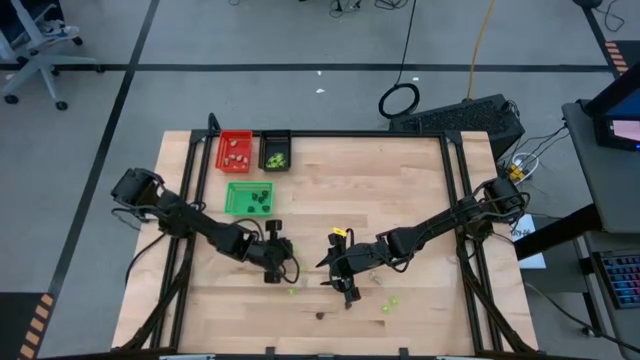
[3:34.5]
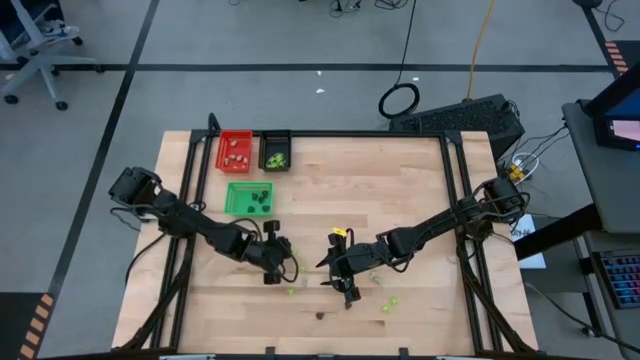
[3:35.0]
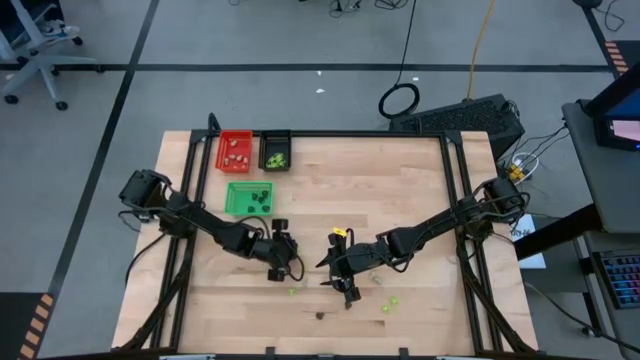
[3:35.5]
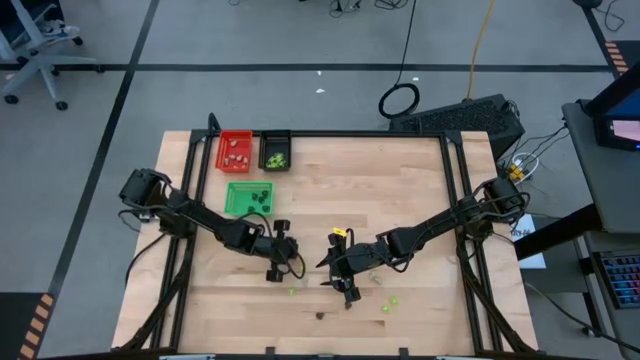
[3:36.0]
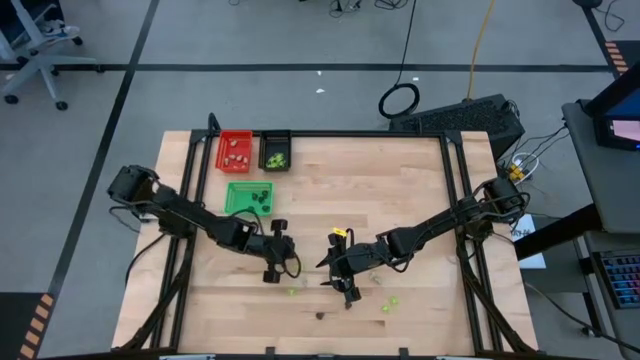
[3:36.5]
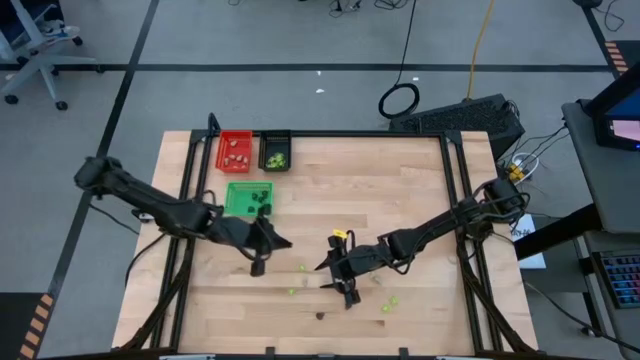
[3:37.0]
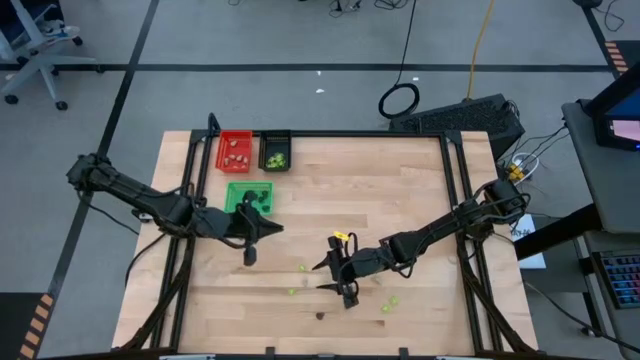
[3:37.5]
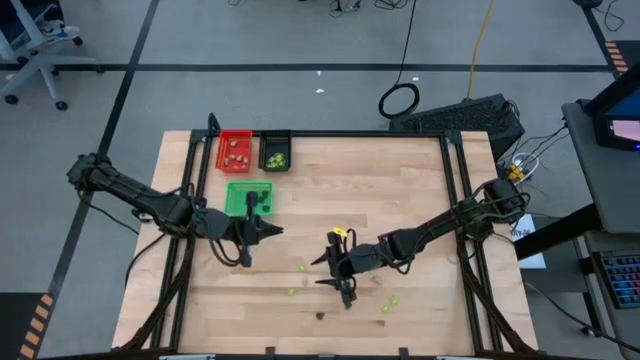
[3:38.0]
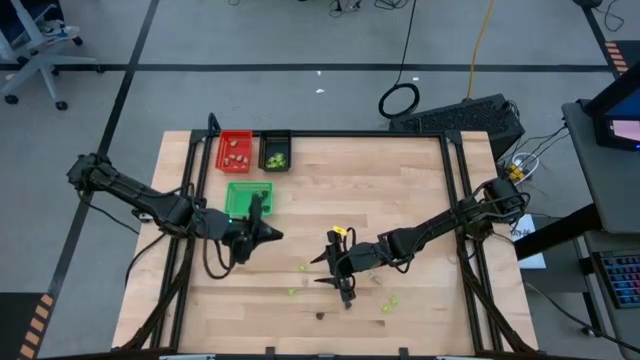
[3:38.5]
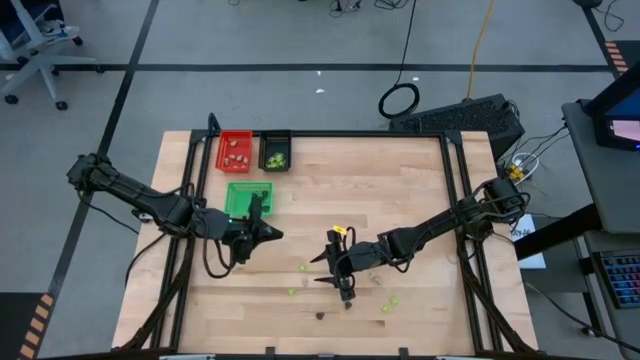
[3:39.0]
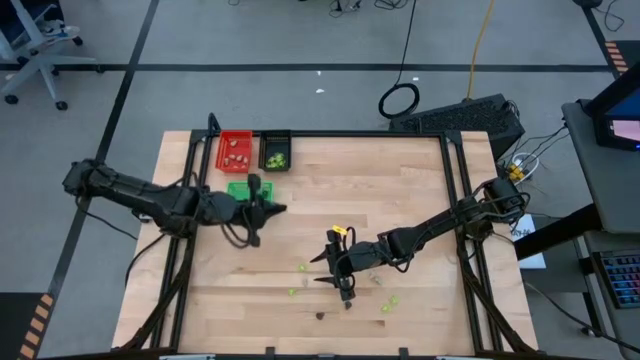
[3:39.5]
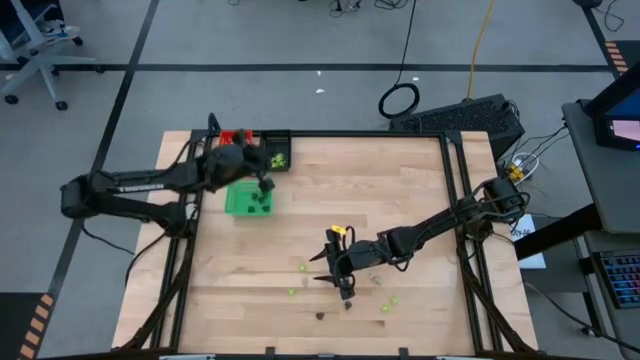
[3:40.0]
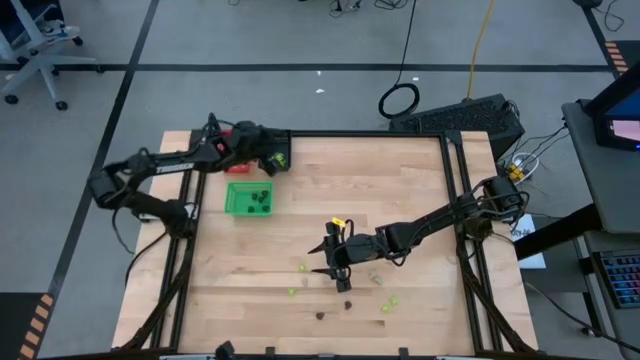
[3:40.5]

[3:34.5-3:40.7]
Task: Sort Halloween decoration
Put the green spider toy into the black bin

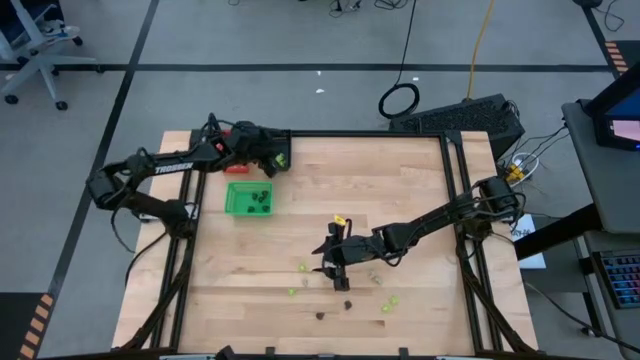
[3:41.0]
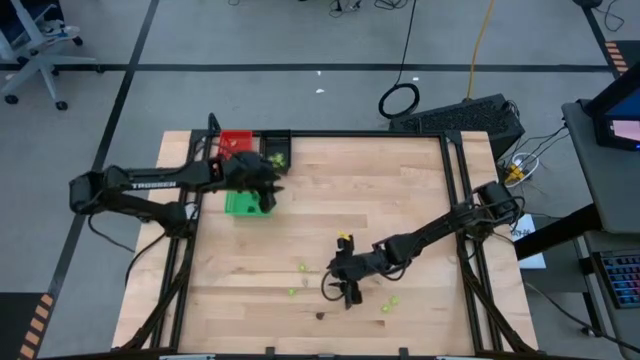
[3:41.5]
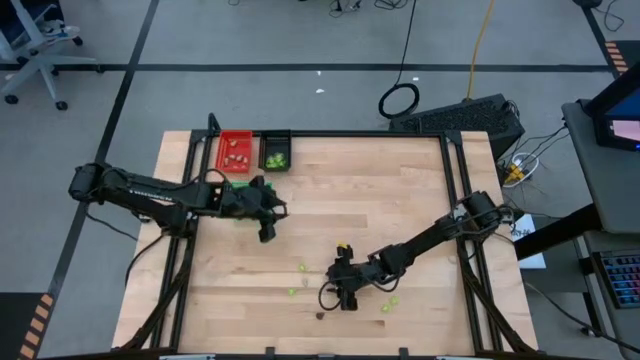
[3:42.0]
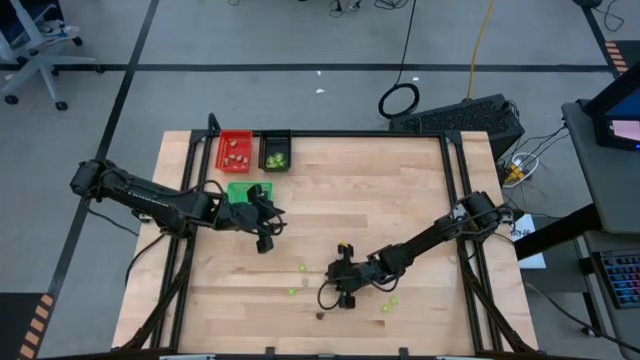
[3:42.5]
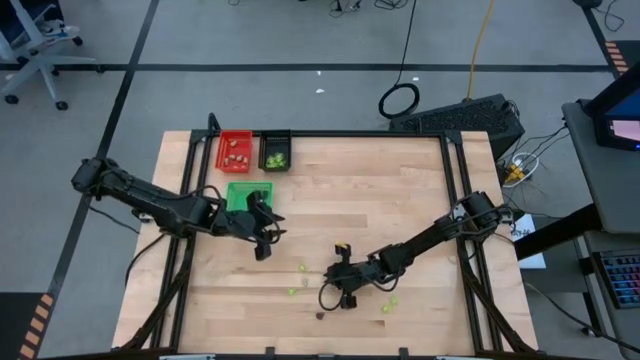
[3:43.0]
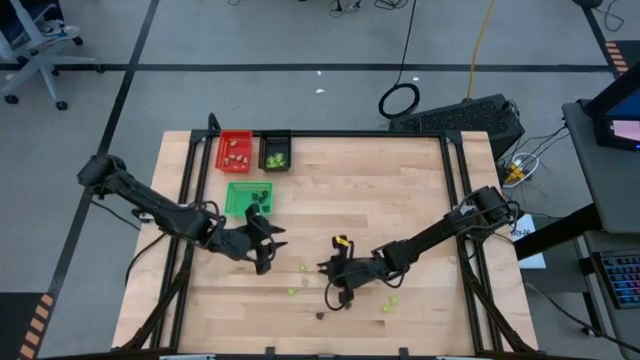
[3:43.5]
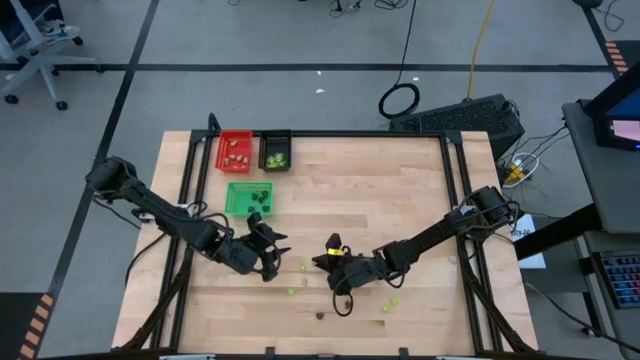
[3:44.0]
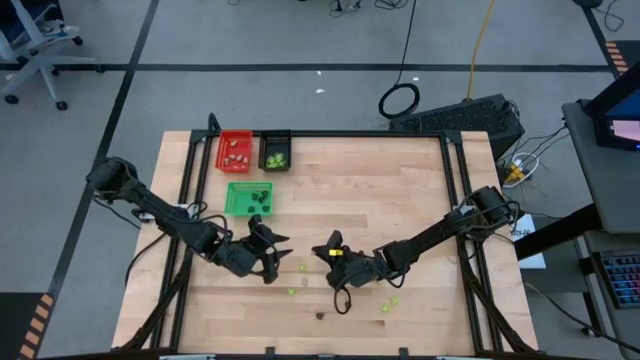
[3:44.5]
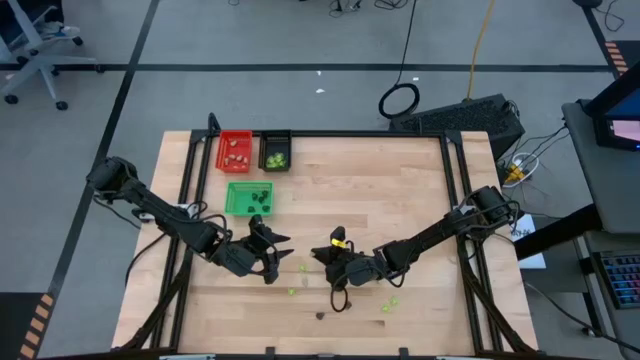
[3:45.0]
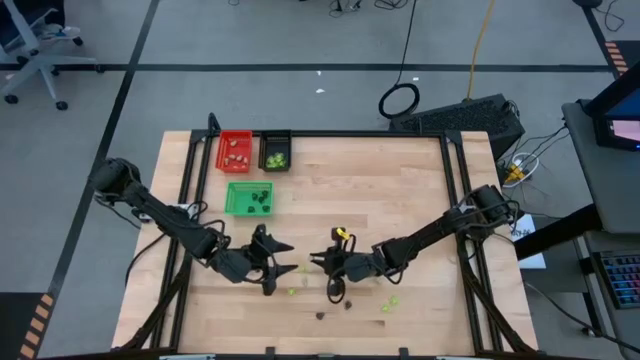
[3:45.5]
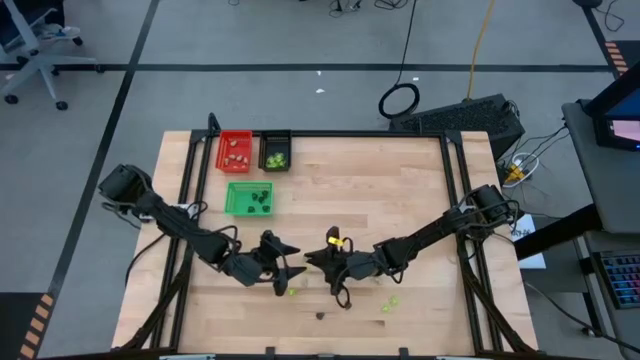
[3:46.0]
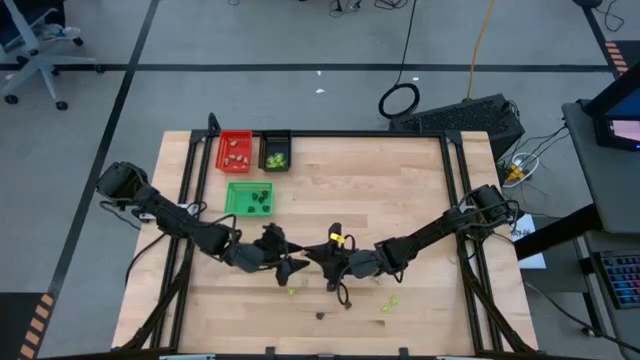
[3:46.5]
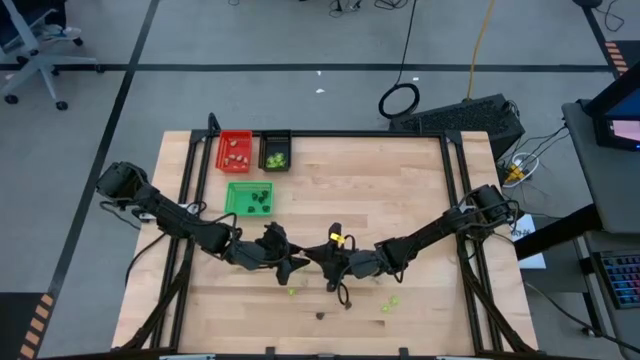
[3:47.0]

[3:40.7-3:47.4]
Put the white skull toy into the red bin

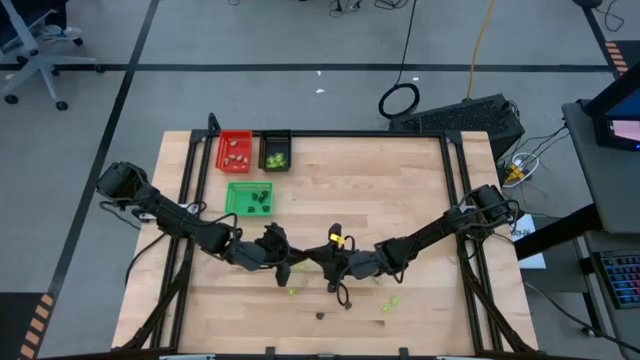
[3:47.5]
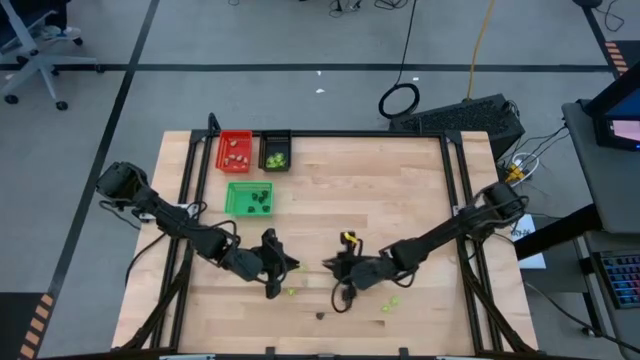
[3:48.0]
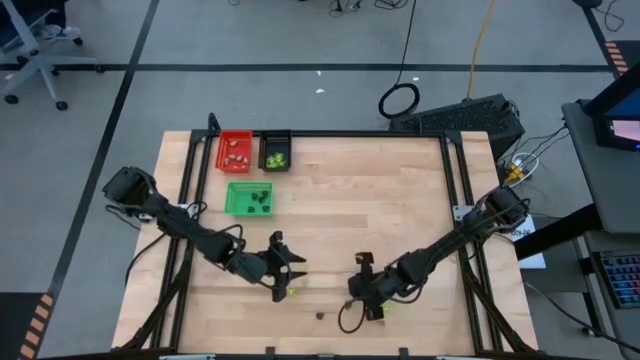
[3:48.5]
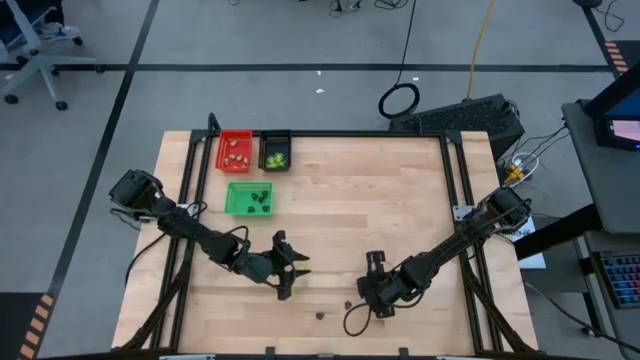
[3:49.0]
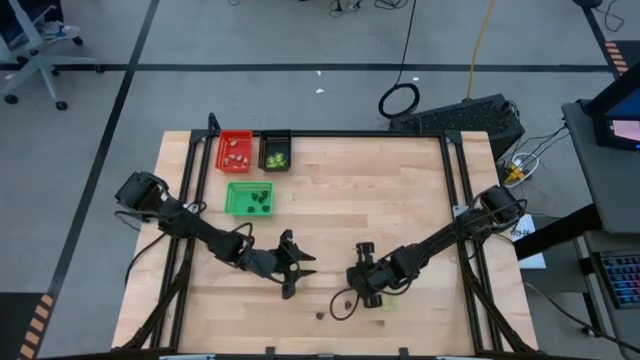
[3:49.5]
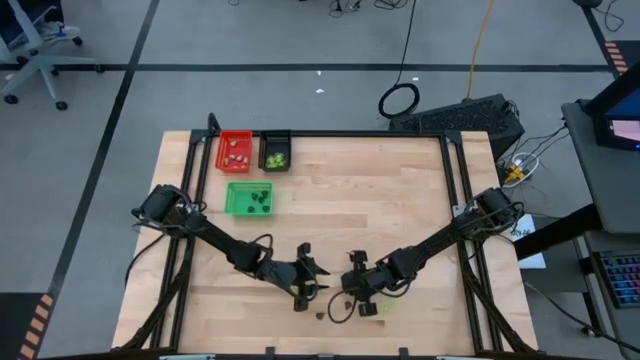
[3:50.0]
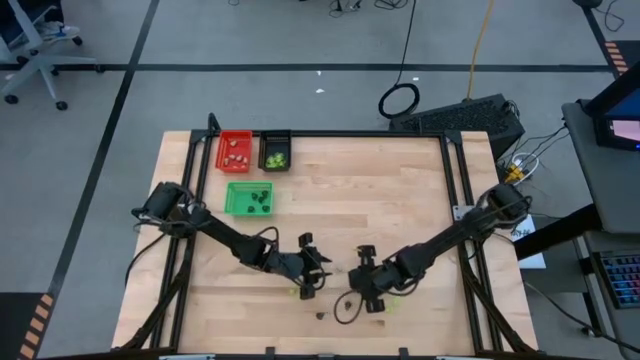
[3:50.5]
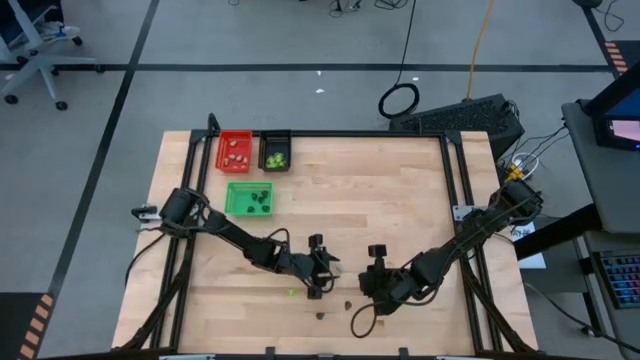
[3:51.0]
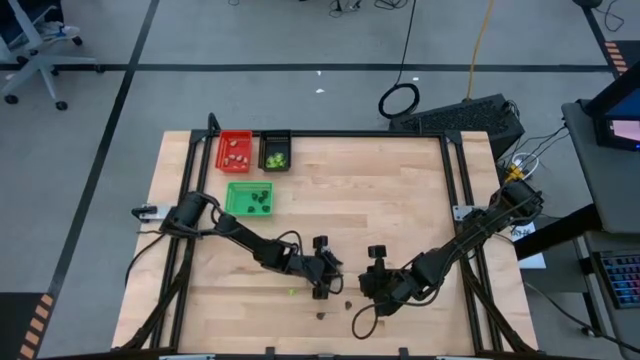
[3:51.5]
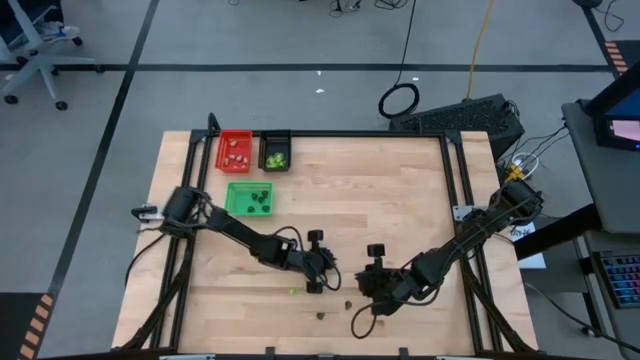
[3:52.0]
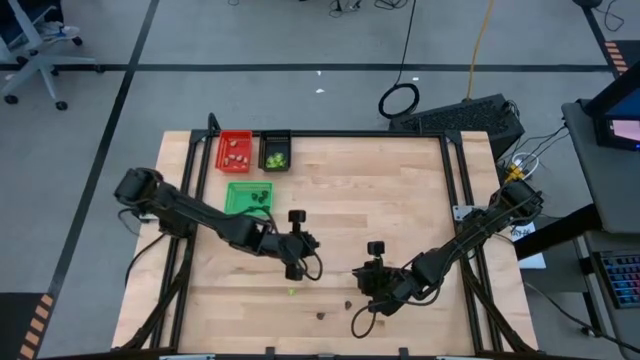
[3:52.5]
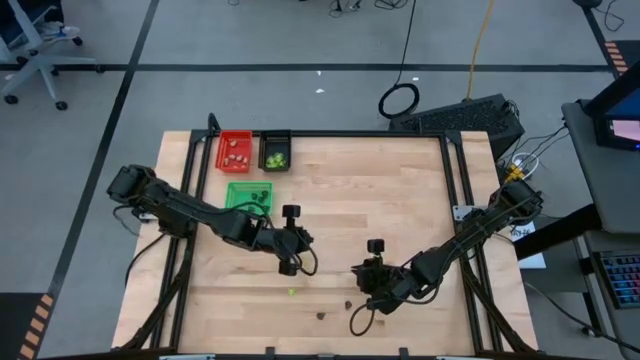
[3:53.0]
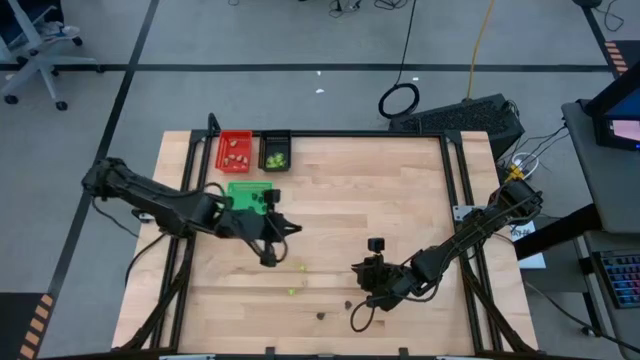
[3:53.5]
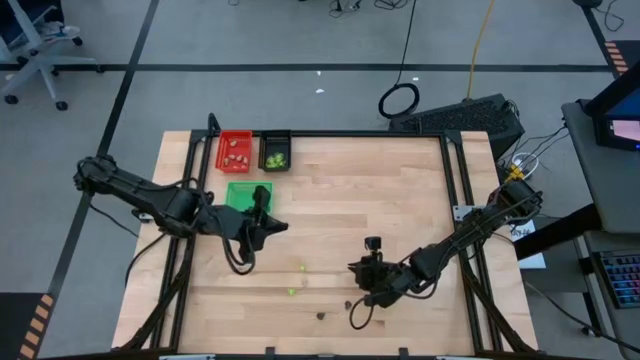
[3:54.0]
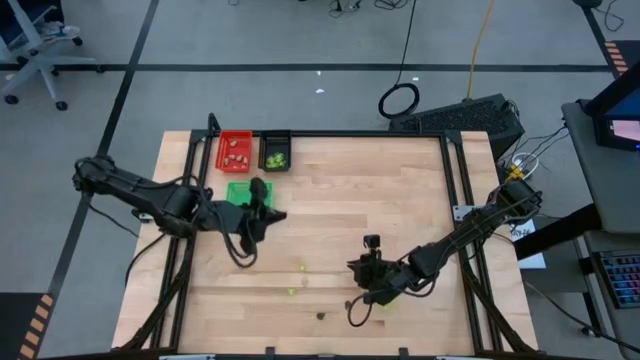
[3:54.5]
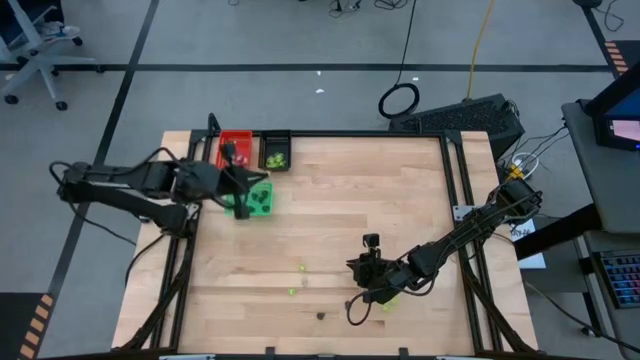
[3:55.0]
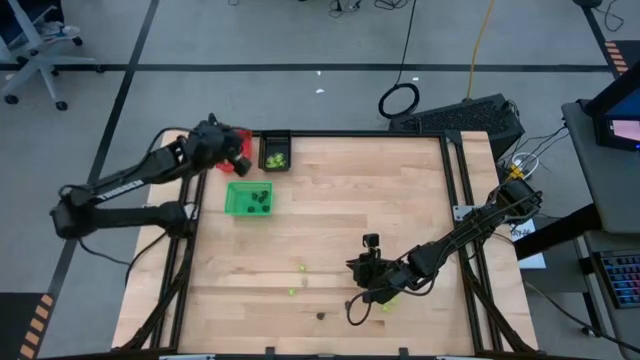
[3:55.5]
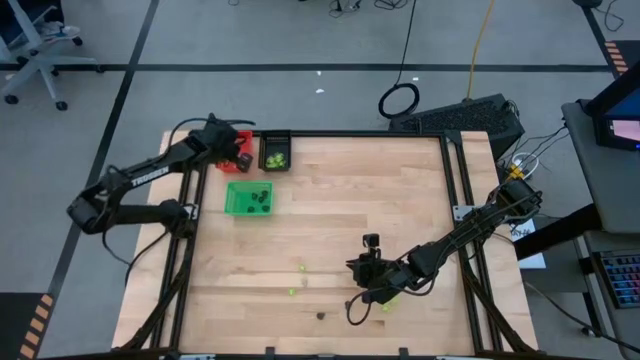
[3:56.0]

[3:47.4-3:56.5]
Put the white skull toy into the red bin
